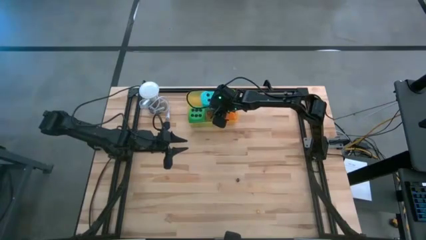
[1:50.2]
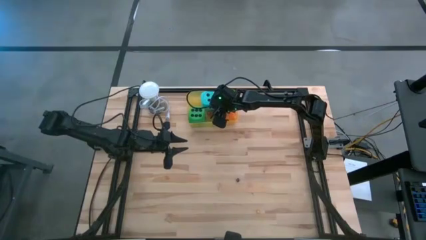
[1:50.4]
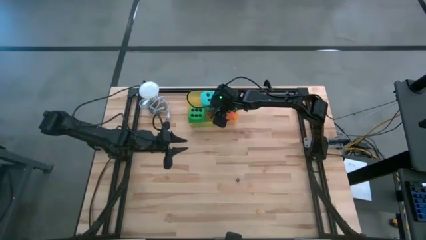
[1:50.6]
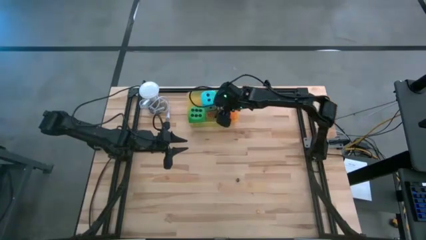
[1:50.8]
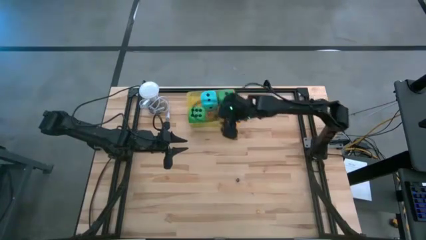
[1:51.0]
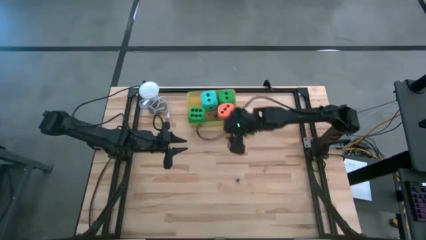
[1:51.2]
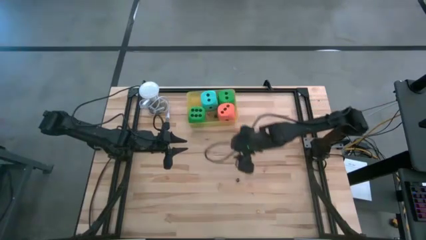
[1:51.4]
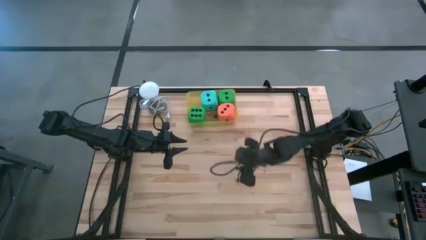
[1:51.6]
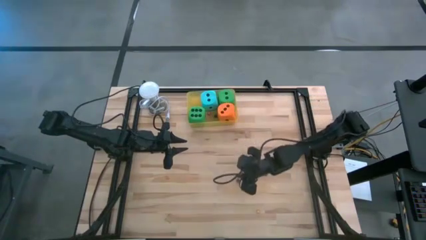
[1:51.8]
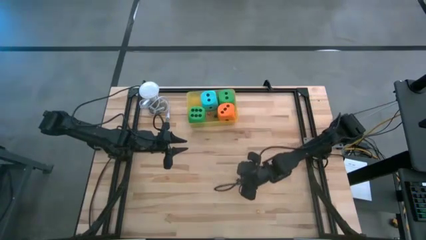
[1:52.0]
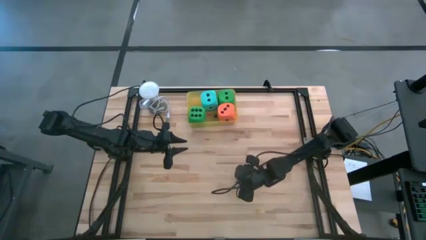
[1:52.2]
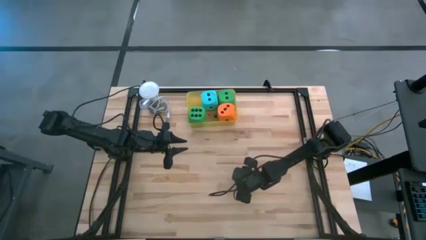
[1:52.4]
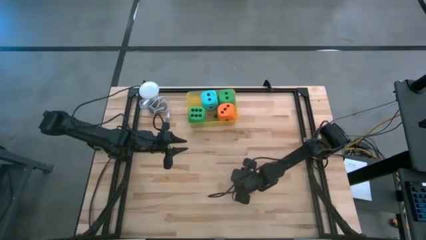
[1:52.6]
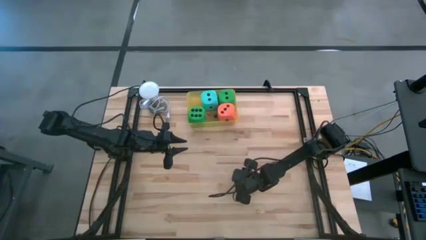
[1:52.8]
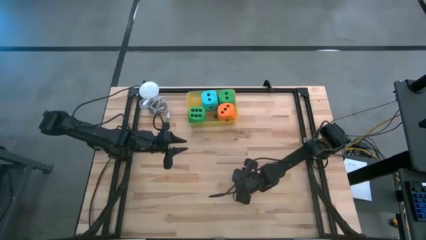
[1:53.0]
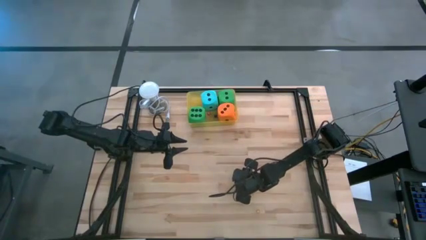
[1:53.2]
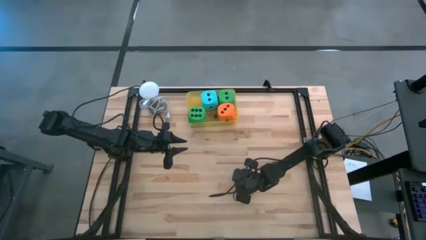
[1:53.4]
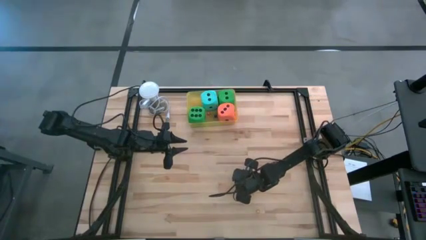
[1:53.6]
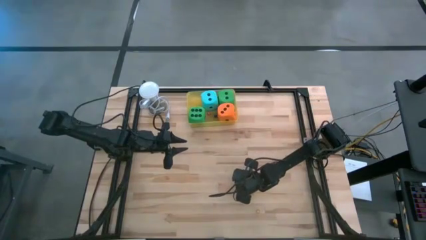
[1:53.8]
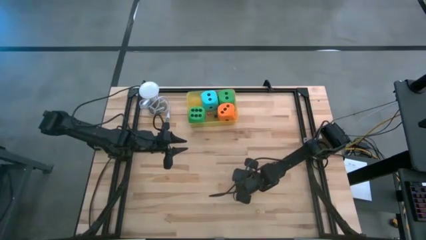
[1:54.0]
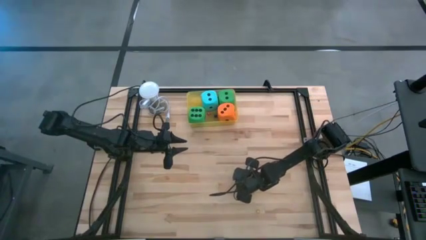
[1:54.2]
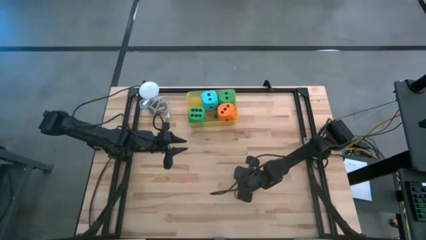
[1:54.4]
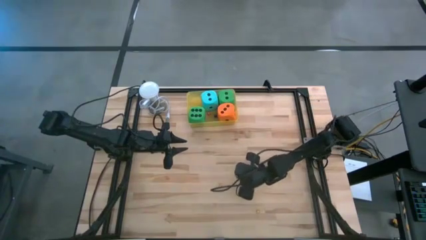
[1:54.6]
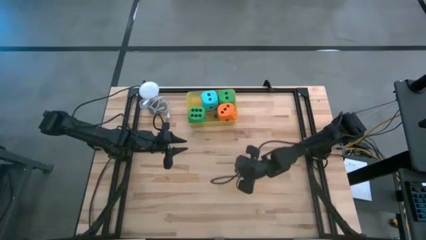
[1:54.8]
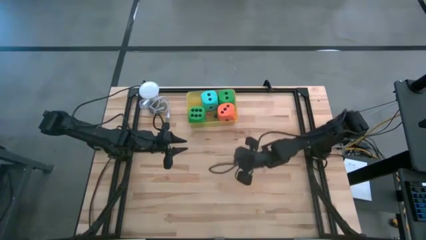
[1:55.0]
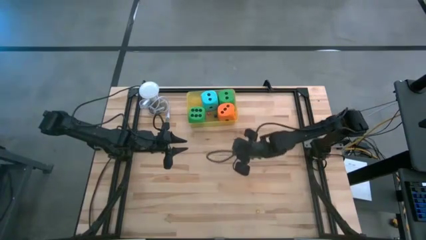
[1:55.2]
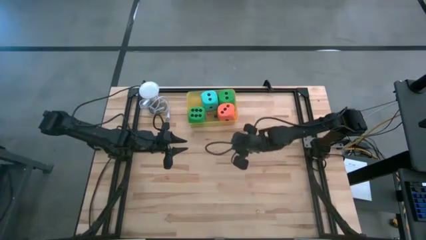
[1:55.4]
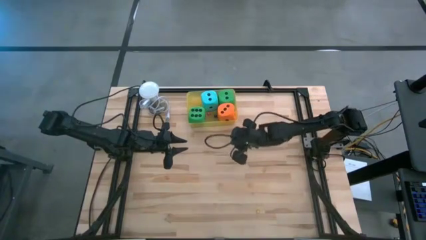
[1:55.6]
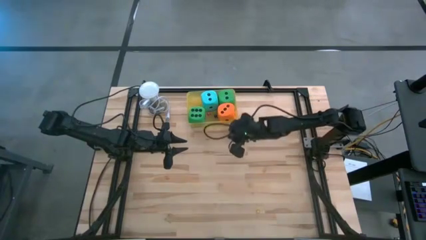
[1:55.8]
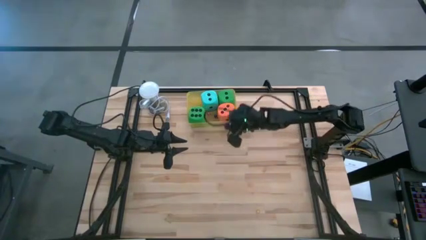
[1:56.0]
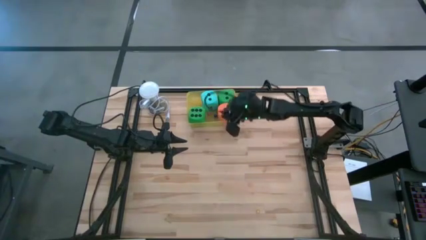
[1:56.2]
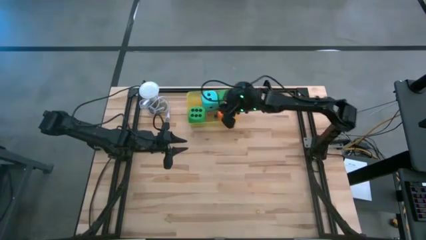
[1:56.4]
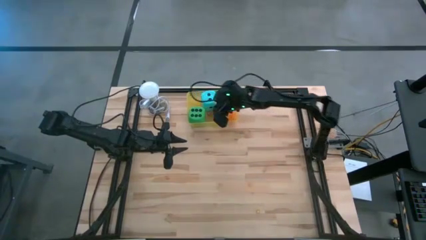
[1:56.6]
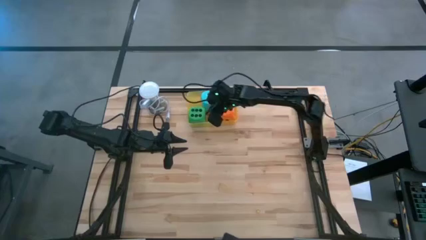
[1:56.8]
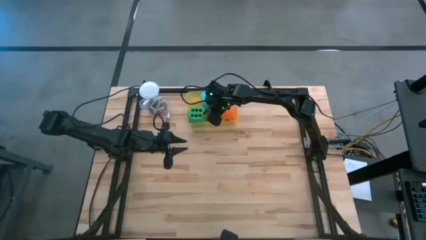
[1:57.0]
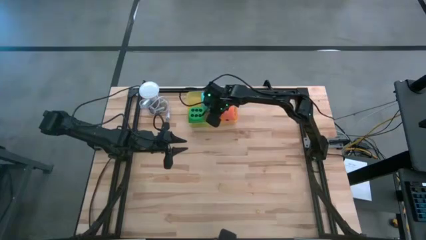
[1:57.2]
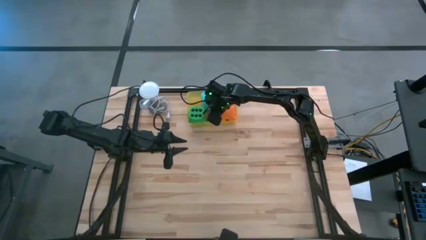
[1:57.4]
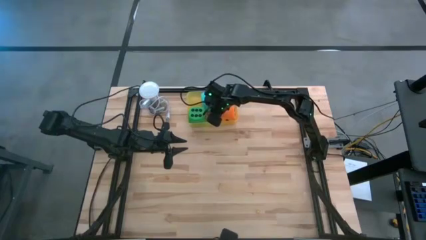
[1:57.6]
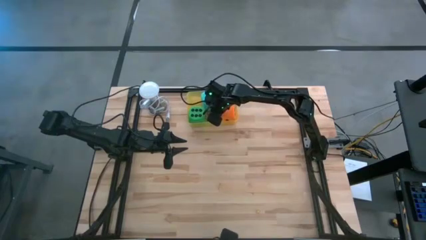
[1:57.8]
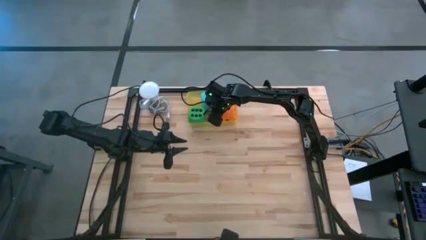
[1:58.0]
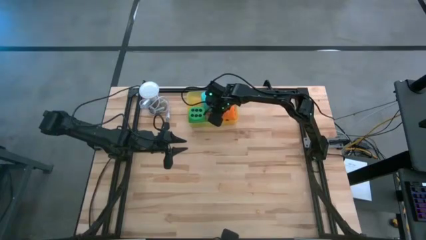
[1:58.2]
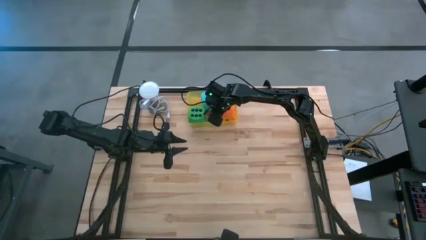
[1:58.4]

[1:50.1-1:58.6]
Task: Pick & Place Dice
Put the black small die into the yellow bin

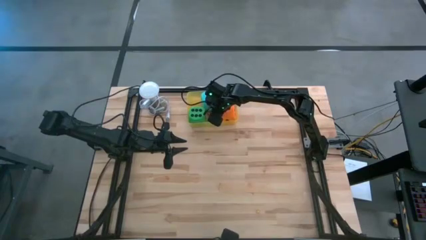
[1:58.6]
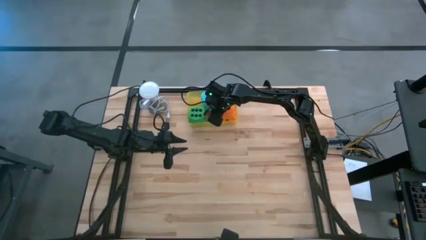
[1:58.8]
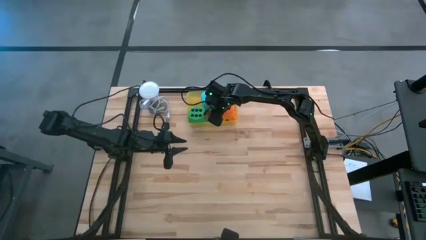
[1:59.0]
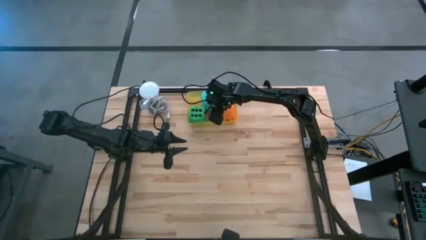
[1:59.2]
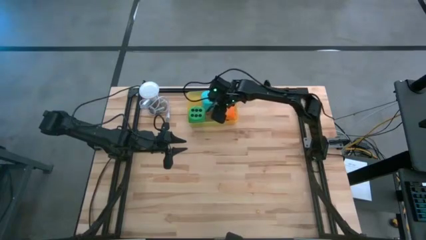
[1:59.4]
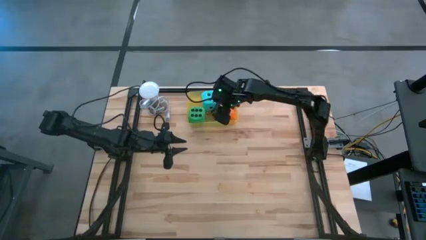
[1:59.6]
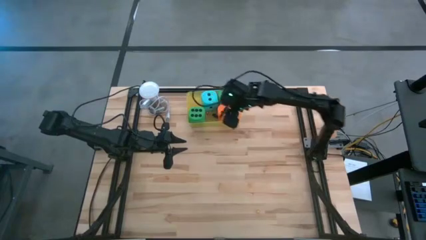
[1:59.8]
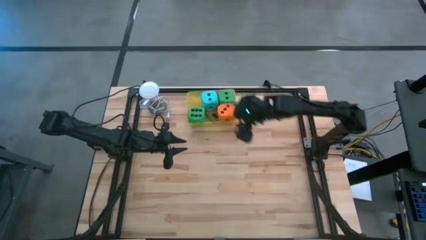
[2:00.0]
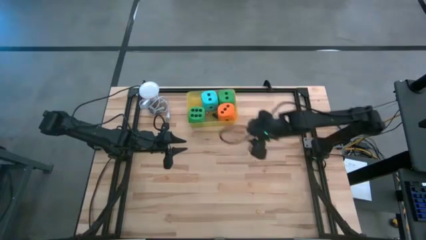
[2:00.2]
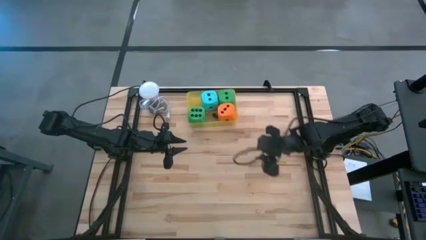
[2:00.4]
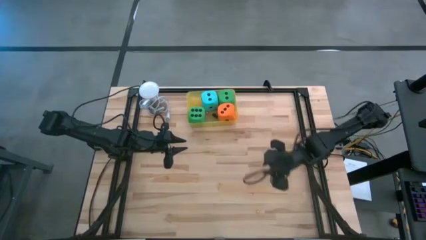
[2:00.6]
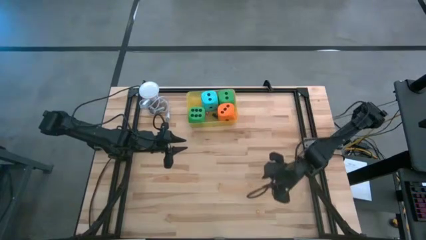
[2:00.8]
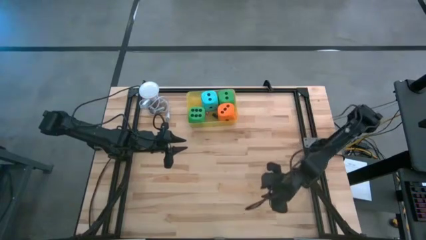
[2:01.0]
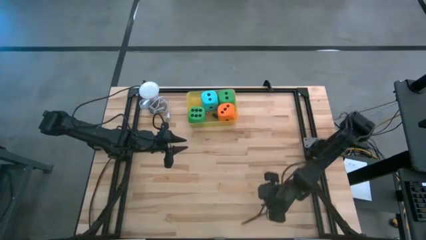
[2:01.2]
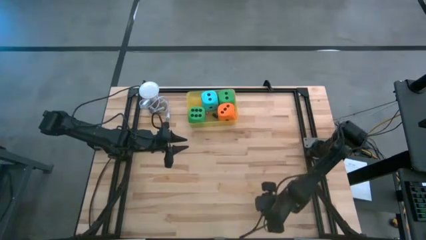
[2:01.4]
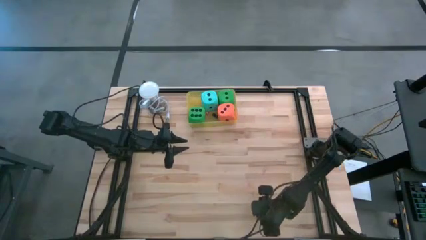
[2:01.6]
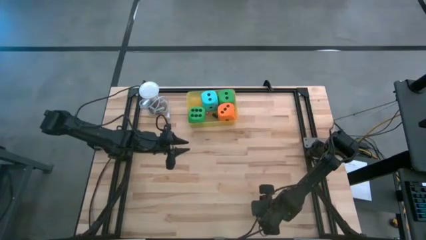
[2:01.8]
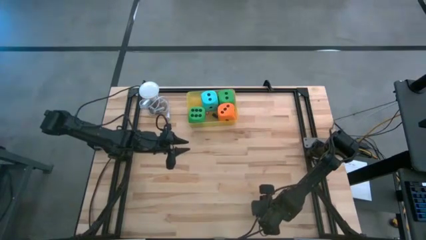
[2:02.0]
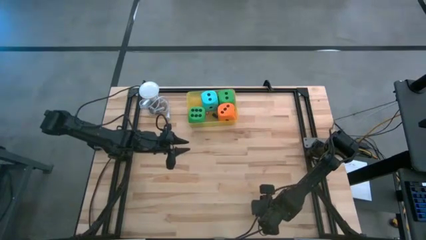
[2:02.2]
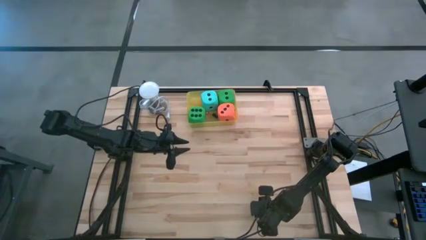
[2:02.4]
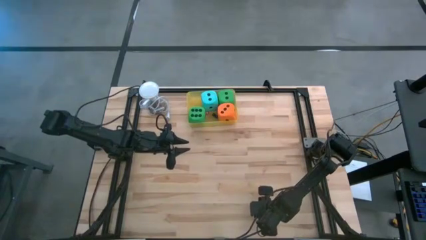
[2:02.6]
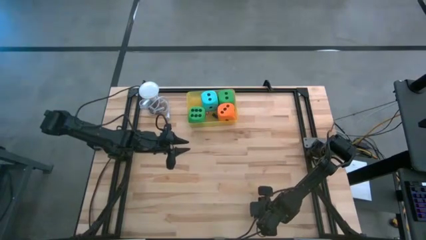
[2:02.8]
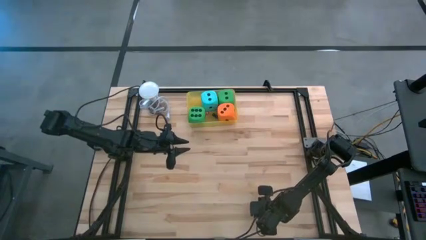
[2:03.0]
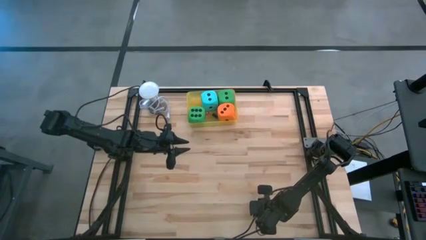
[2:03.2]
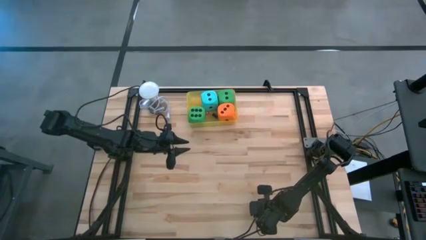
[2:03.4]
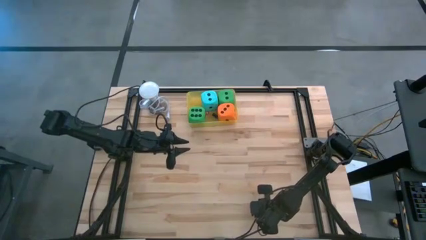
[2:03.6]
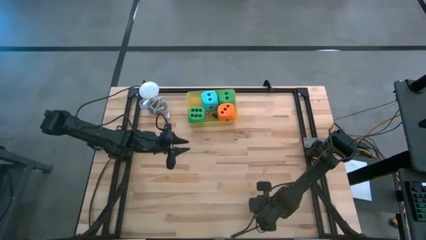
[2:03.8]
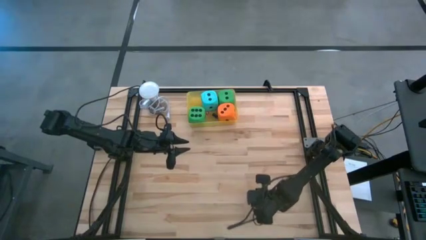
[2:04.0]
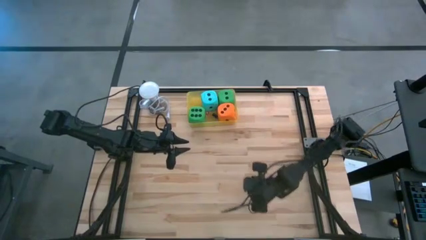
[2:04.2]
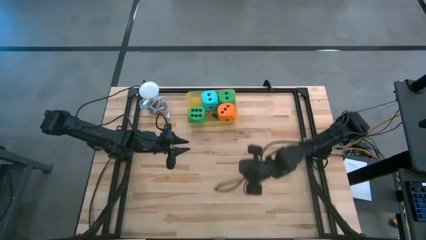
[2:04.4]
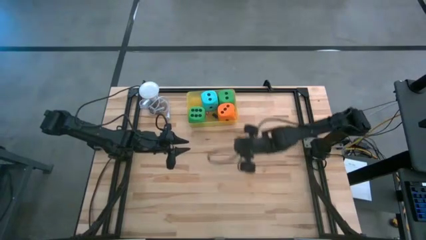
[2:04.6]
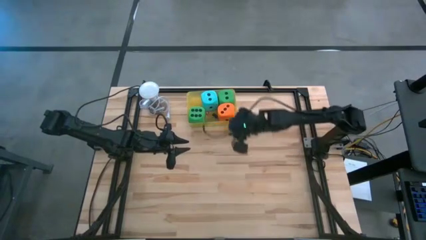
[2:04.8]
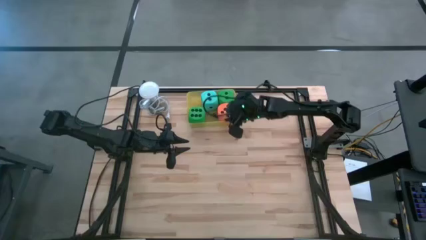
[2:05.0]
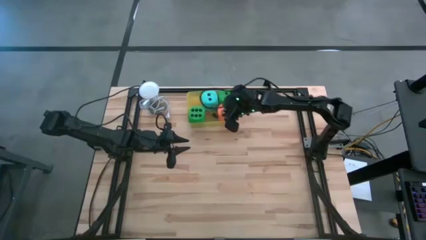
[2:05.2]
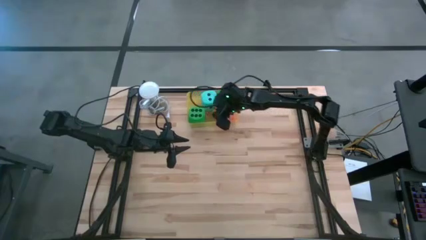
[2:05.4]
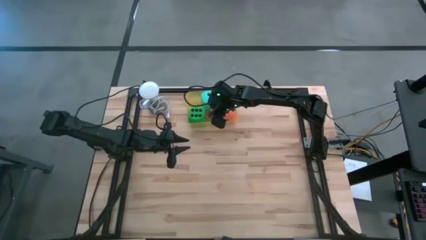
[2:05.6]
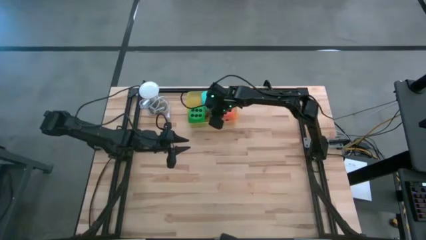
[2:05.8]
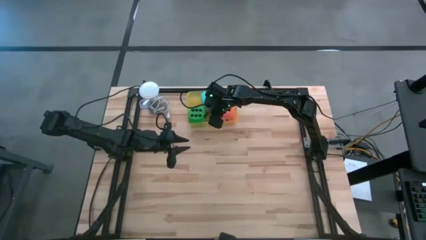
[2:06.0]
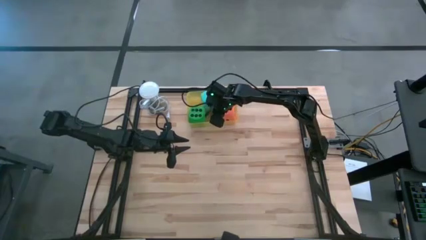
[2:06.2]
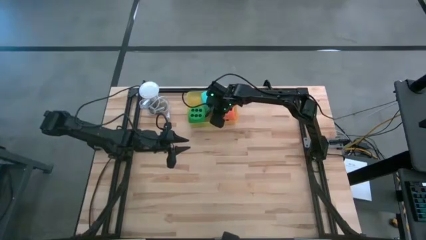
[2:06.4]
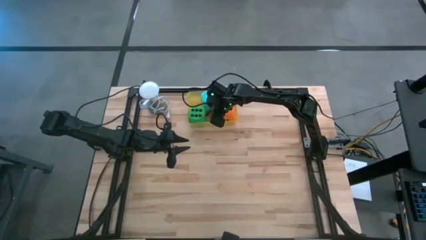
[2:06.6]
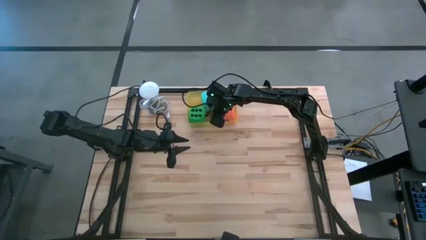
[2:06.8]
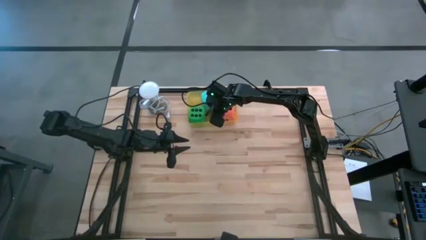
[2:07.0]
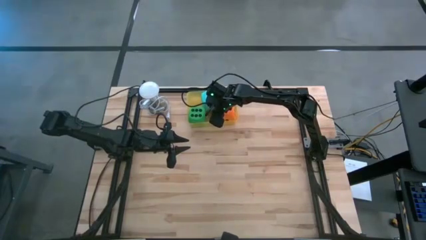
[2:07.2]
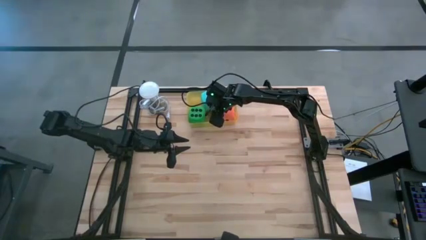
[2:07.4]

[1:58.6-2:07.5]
Put the yellow small die into the yellow bin
